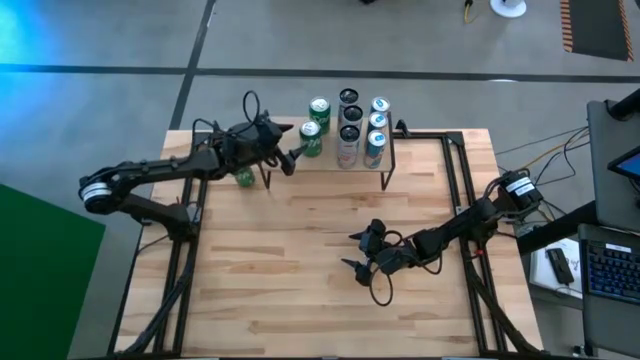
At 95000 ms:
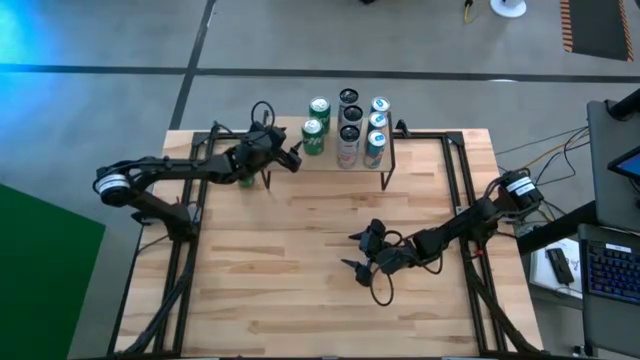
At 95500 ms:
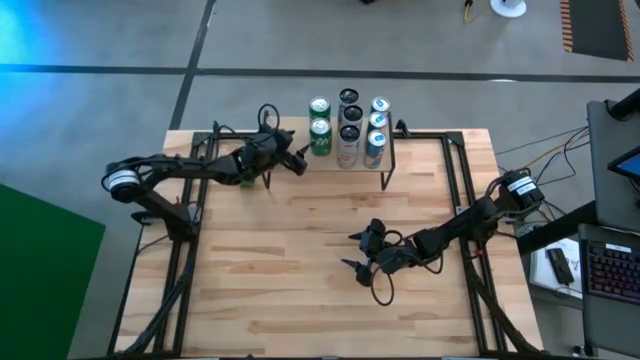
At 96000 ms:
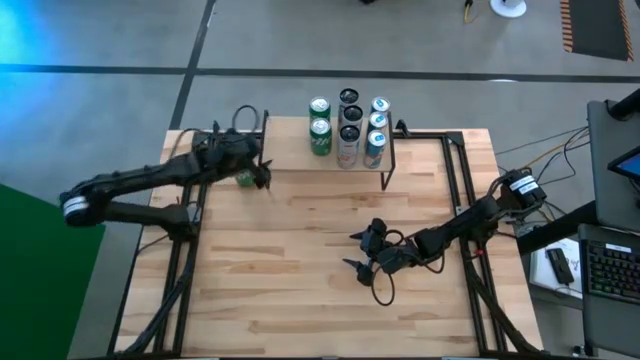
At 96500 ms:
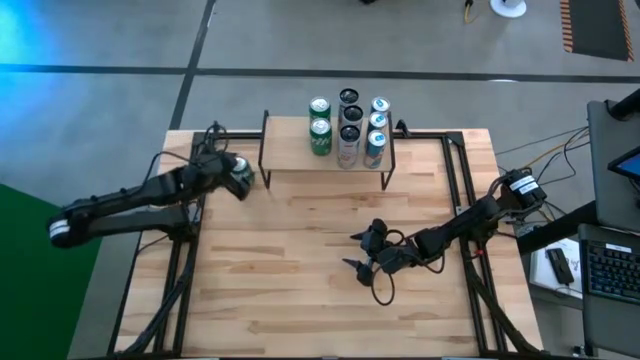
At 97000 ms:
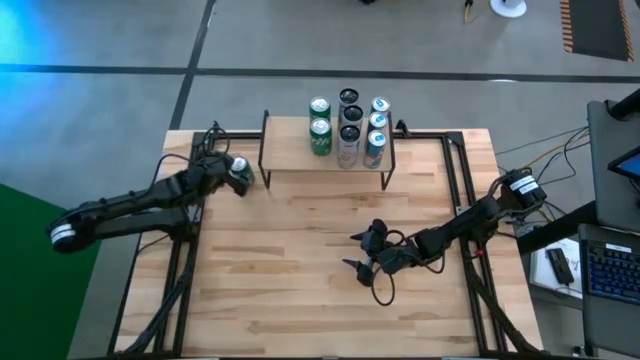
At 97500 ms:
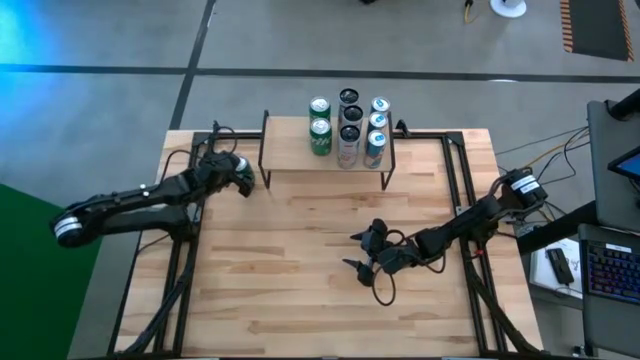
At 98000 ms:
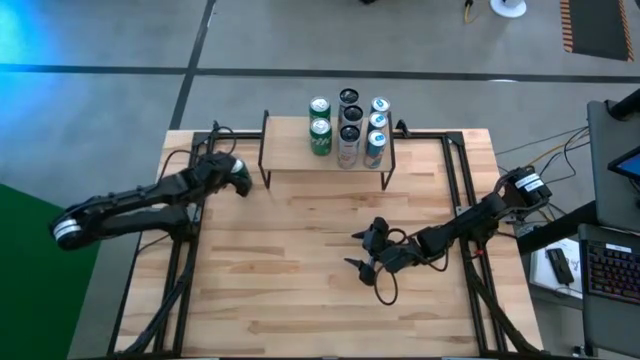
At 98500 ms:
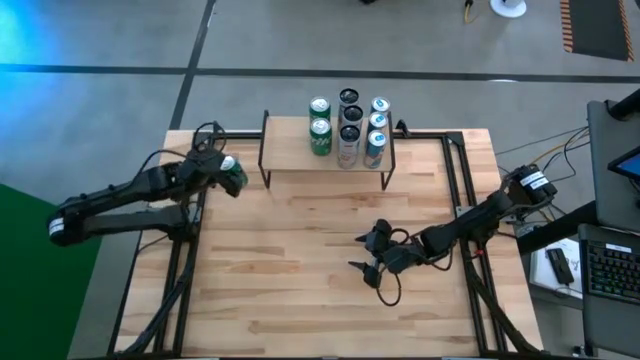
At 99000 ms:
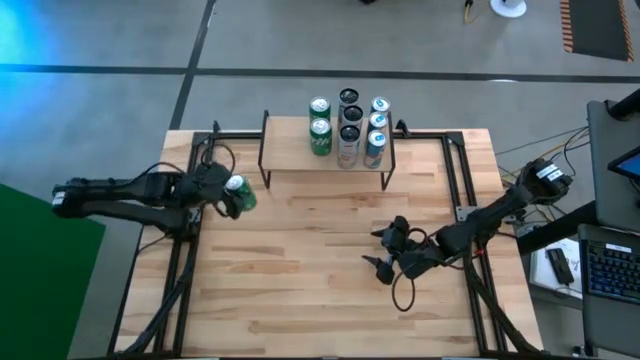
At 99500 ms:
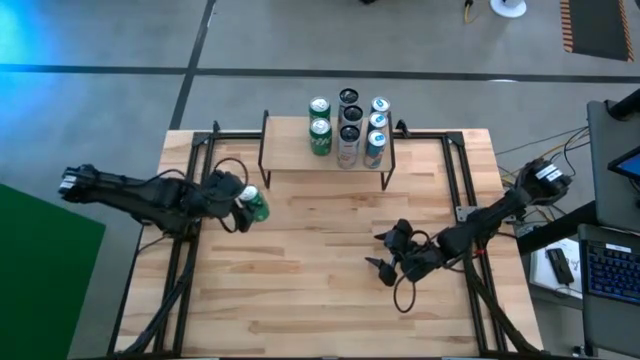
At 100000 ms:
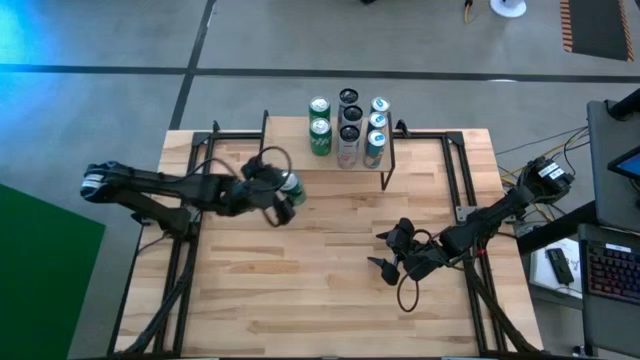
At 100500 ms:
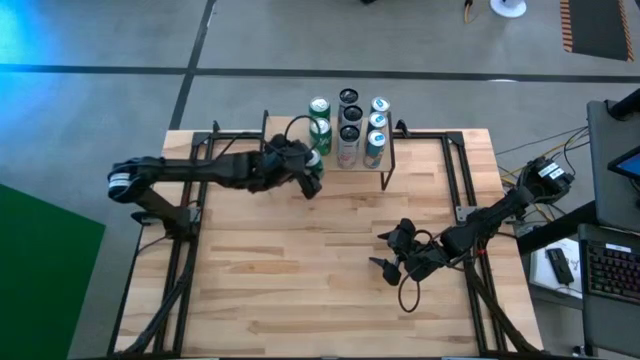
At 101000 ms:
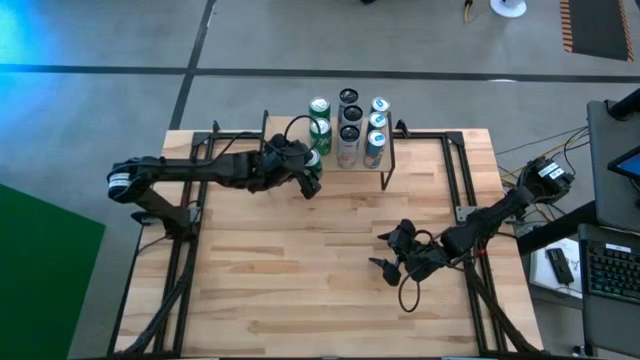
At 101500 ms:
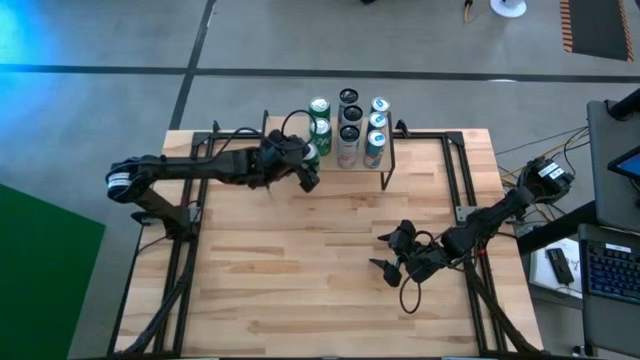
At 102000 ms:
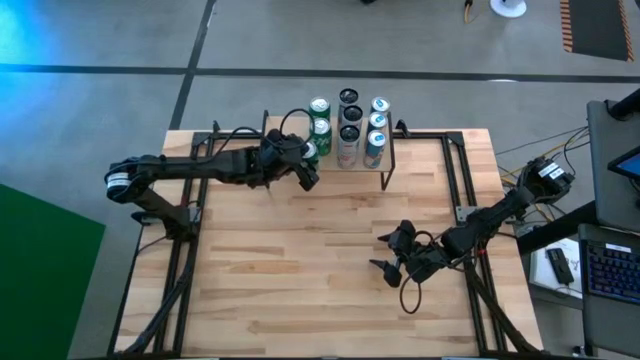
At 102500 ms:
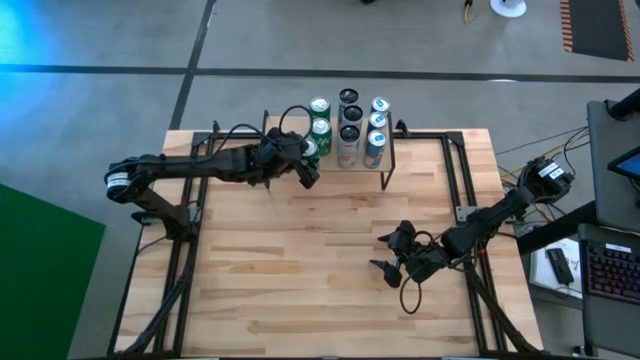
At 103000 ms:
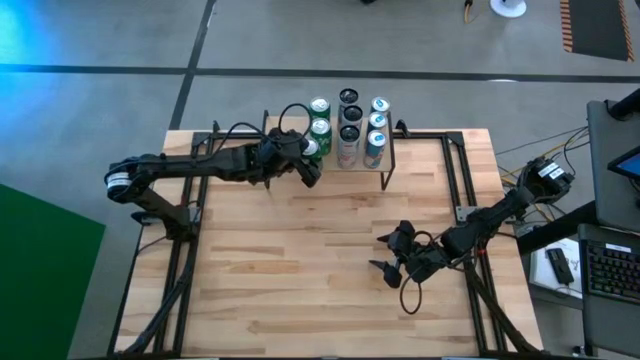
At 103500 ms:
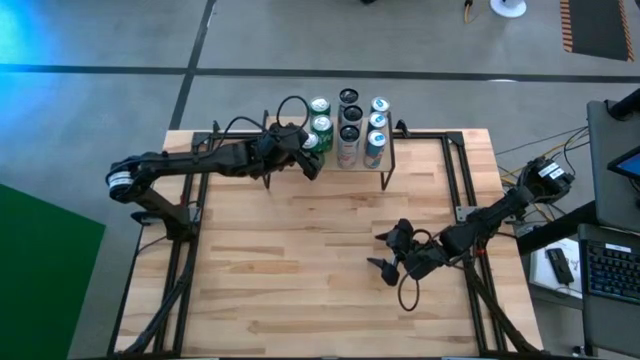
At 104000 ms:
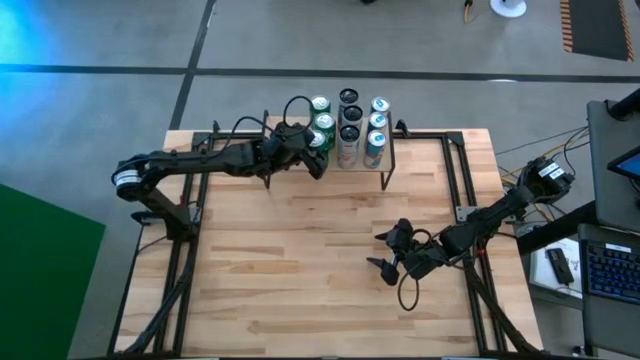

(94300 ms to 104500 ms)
Task: Sort soda cans
Put the green soda can on the shelf and align it with other green soda cans

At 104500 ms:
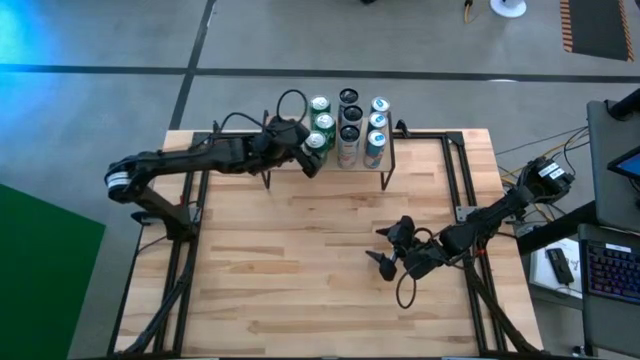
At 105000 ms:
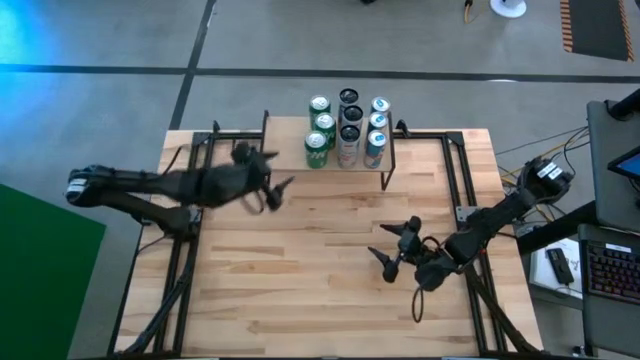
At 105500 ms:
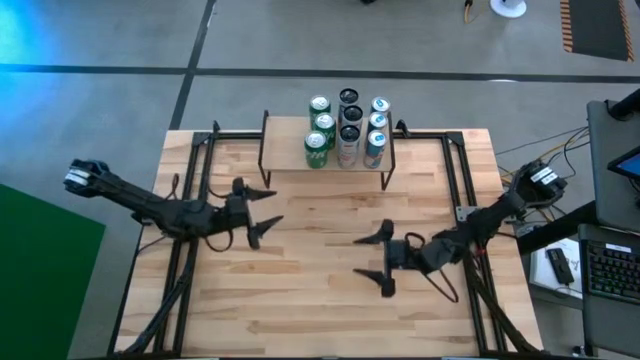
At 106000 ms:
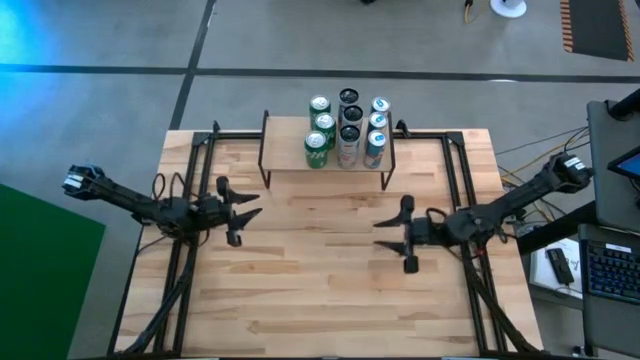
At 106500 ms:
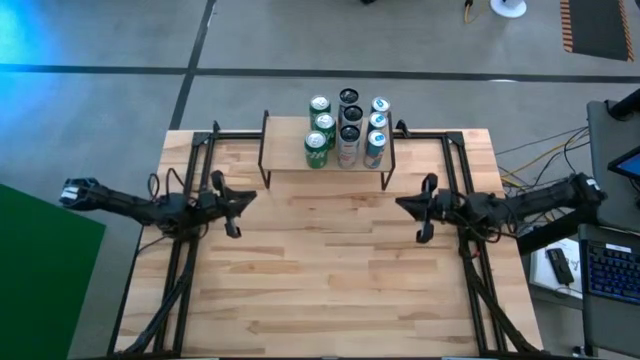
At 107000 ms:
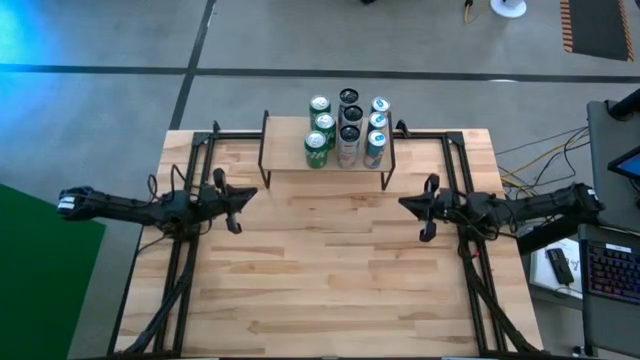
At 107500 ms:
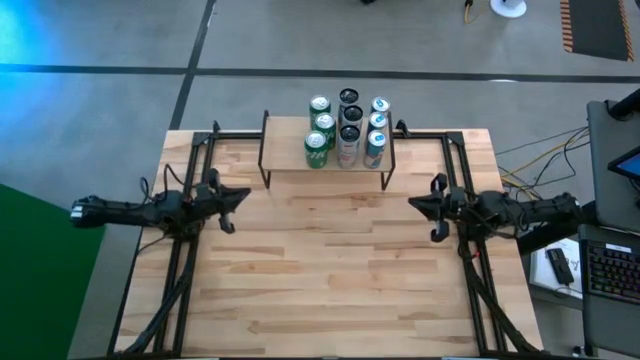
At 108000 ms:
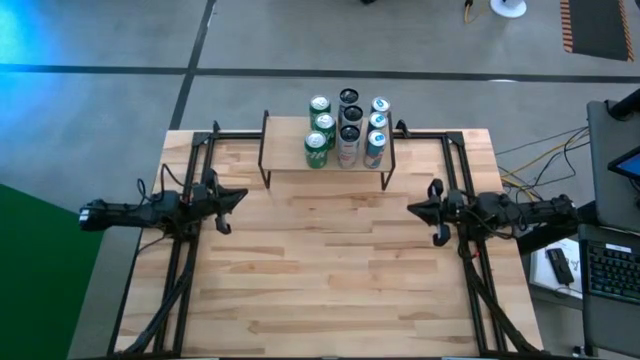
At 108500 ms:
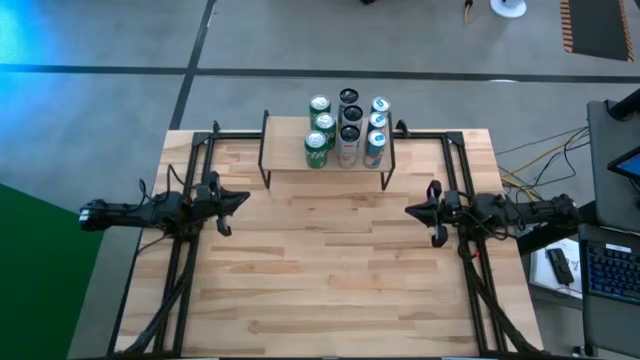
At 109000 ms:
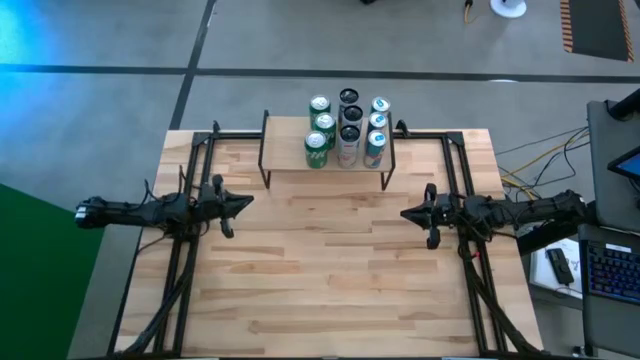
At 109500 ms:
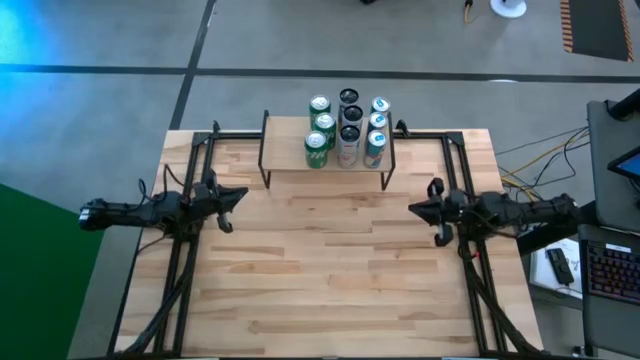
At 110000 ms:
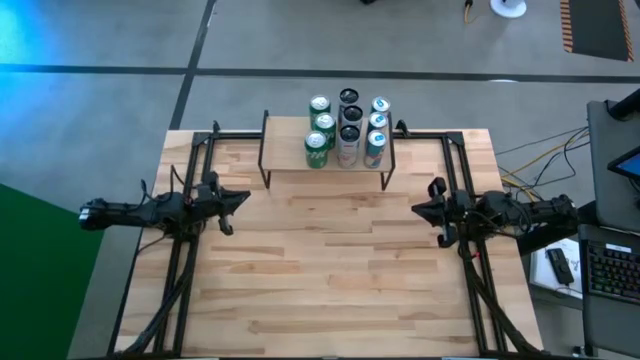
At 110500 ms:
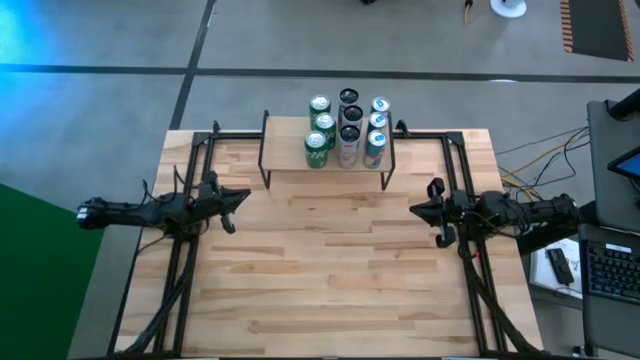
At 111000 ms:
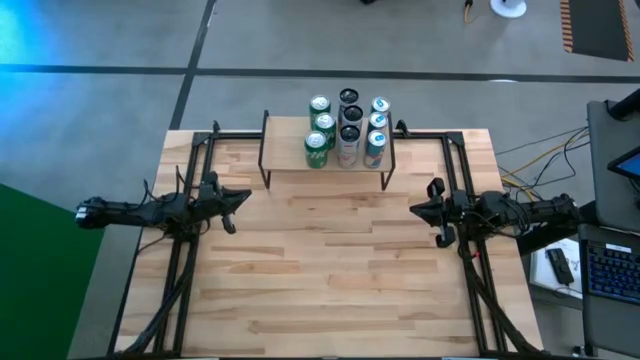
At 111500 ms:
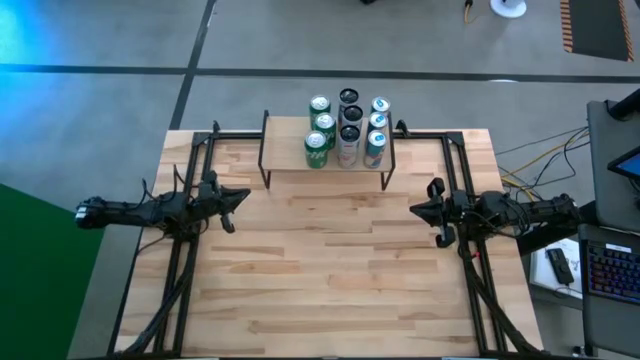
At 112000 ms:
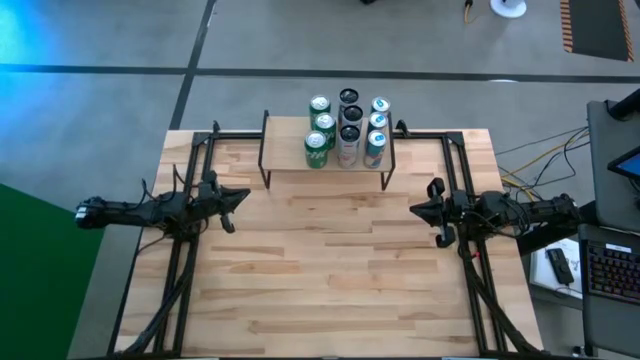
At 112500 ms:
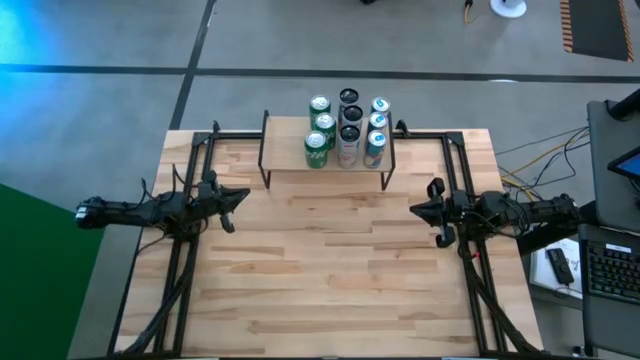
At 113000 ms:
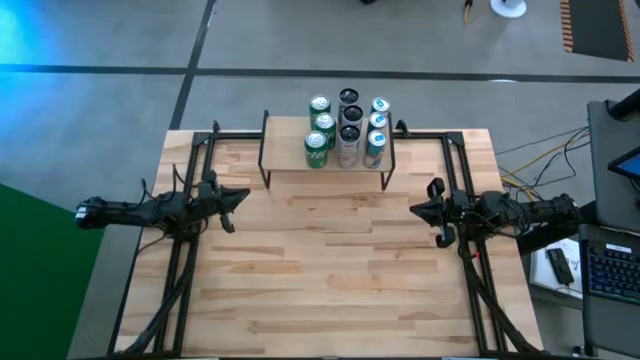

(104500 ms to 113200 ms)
Return to Home Position

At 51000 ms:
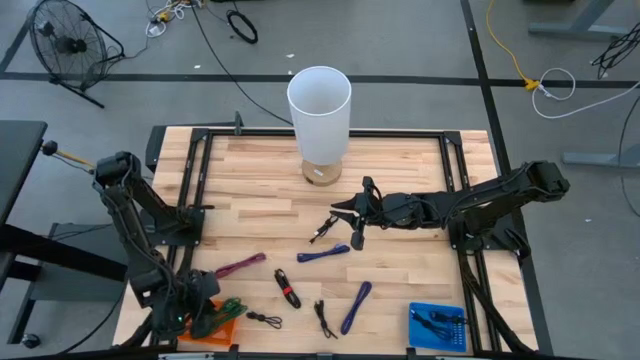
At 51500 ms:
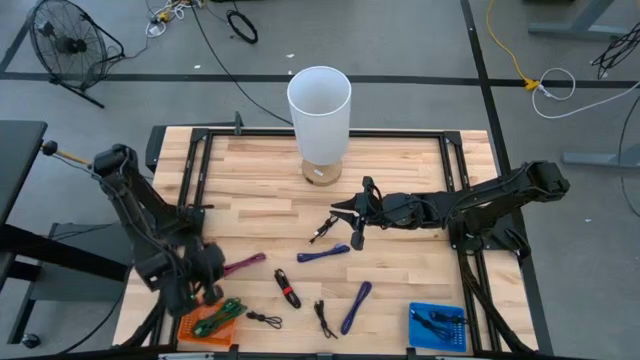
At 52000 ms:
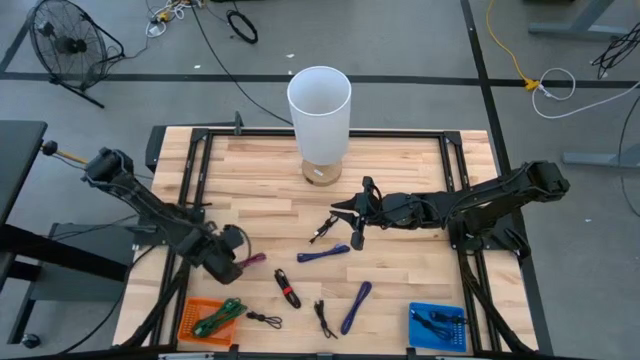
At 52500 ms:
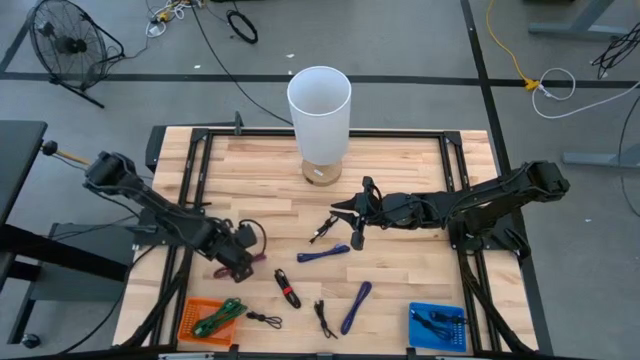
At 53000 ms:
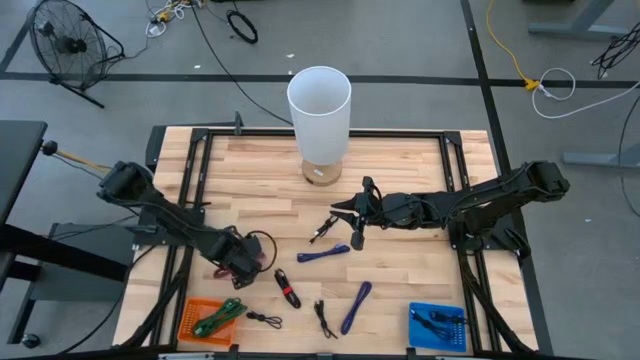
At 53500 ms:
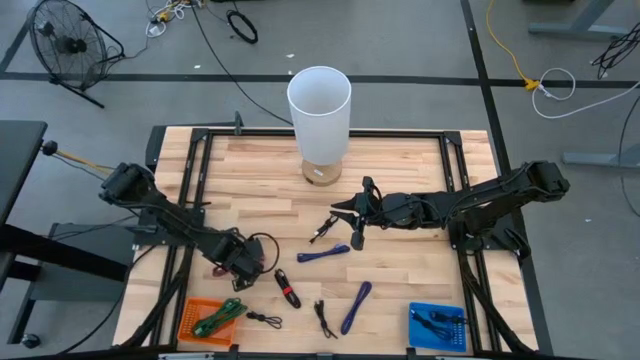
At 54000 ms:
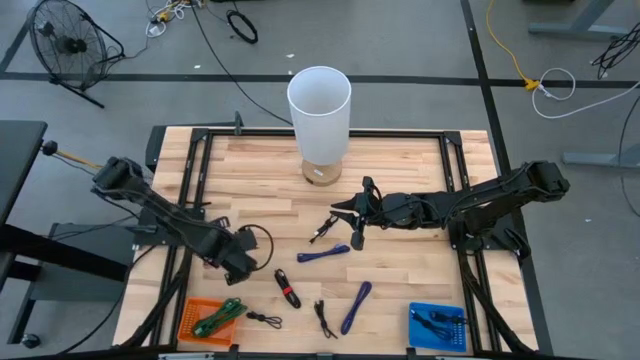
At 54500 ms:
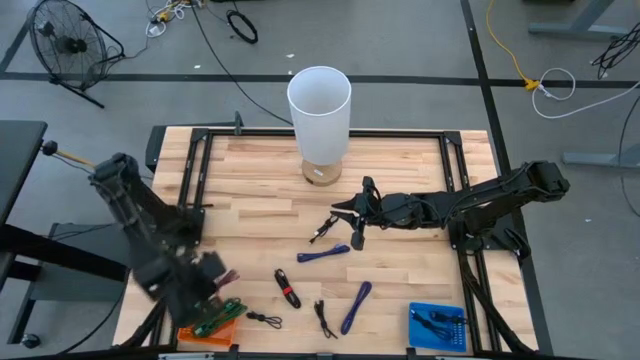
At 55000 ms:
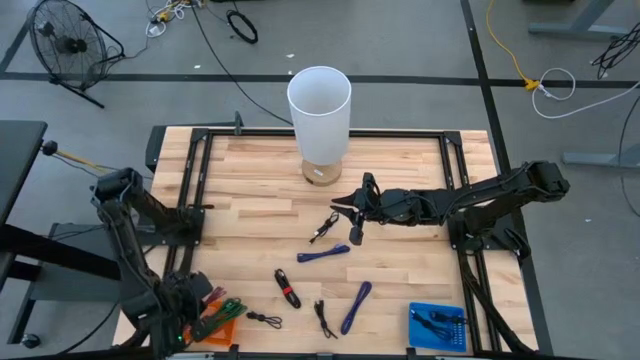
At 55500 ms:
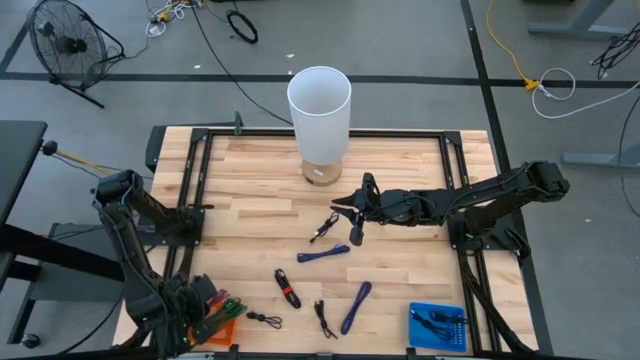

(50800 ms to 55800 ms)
Task: Pick & Place USB Port
Put the black and pink charger cable into the orange bin
